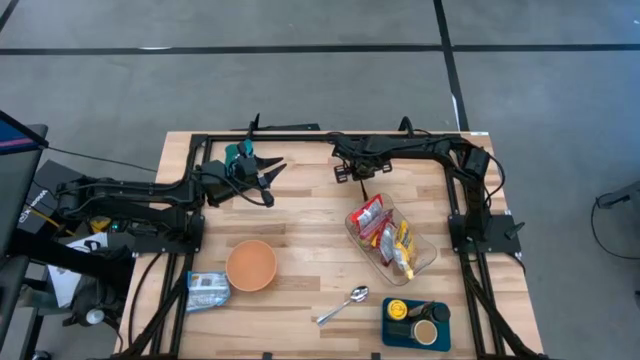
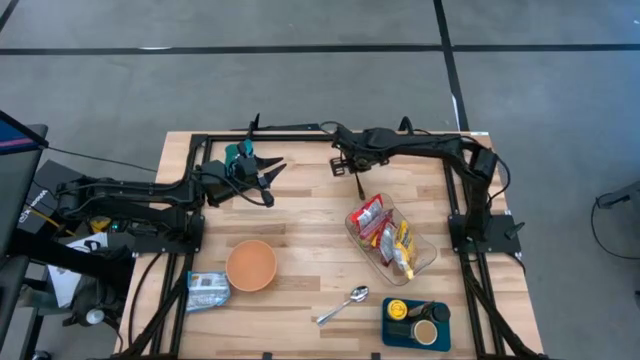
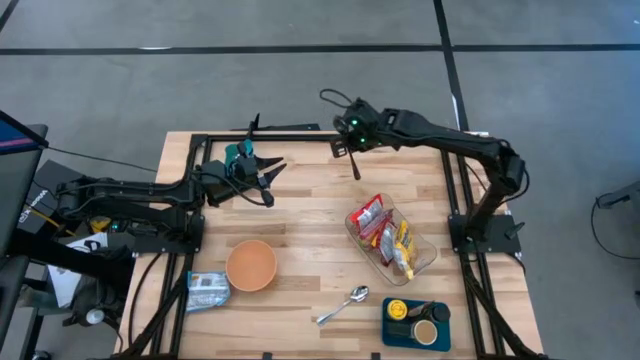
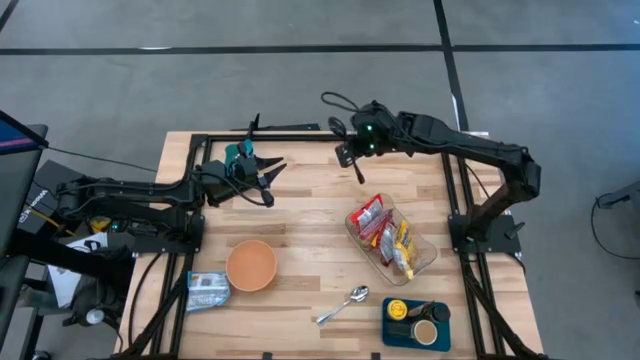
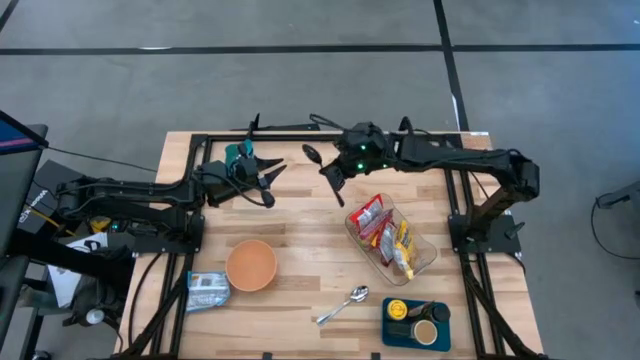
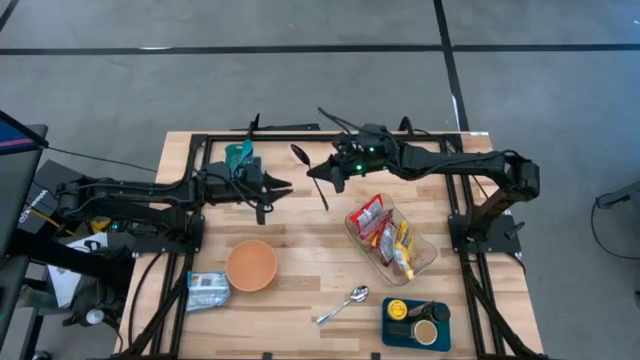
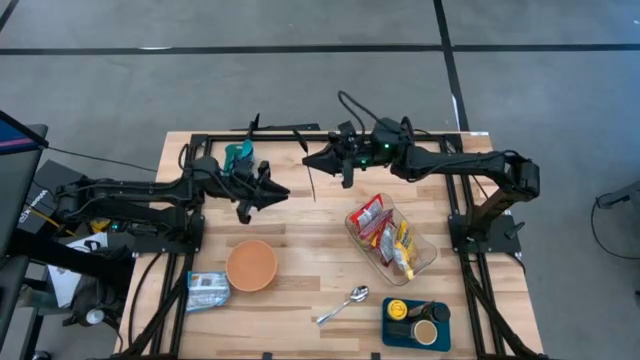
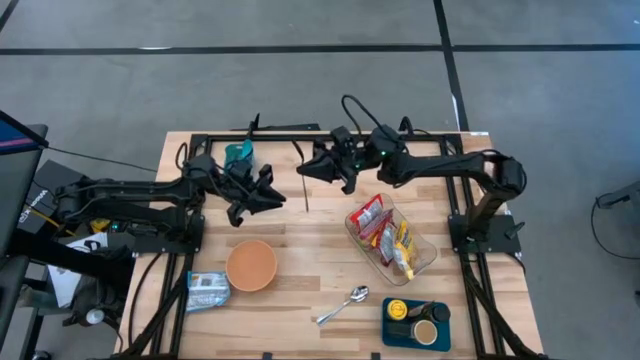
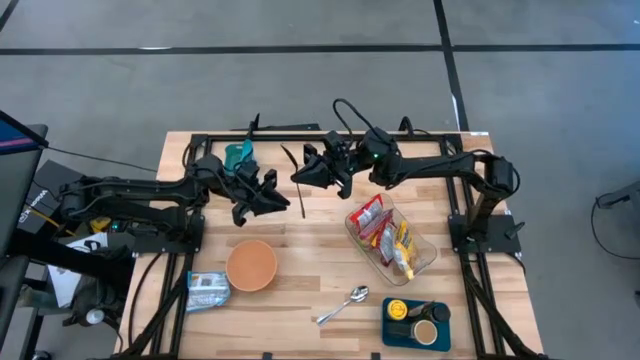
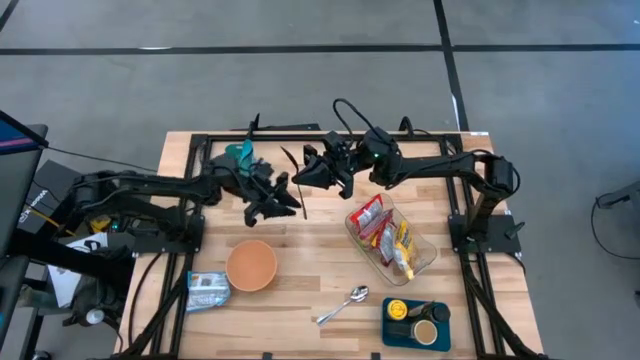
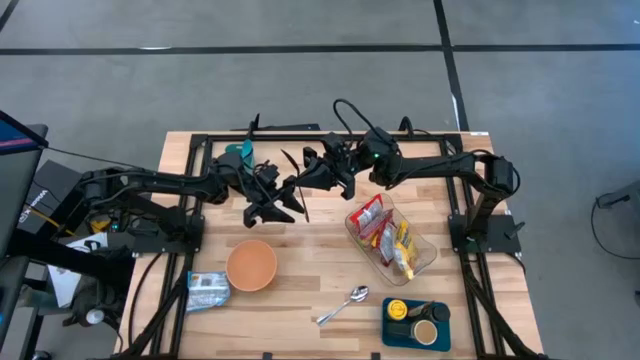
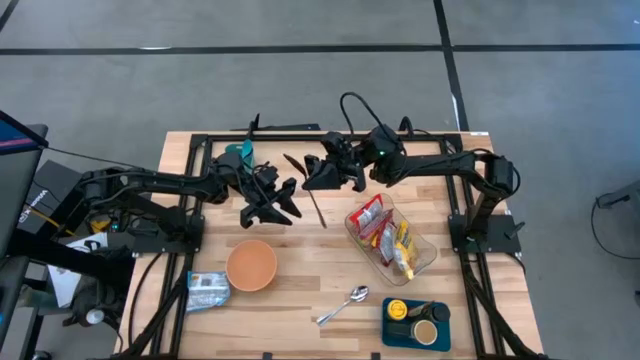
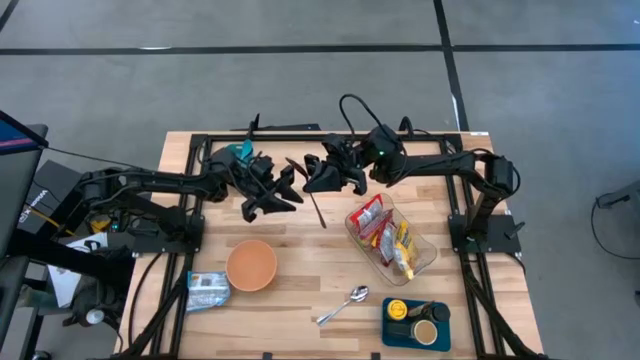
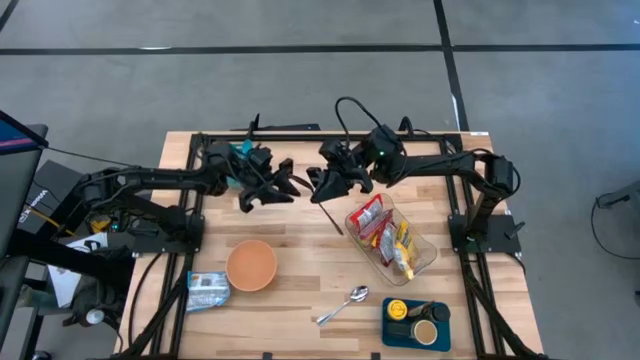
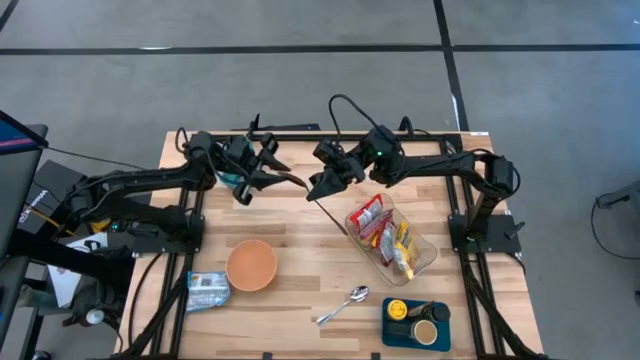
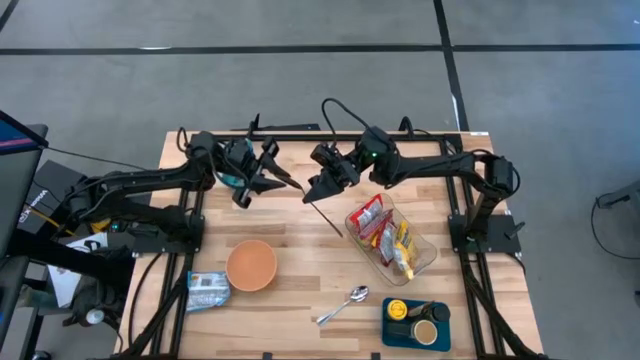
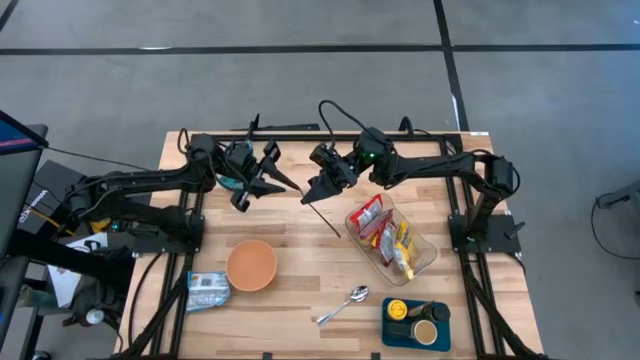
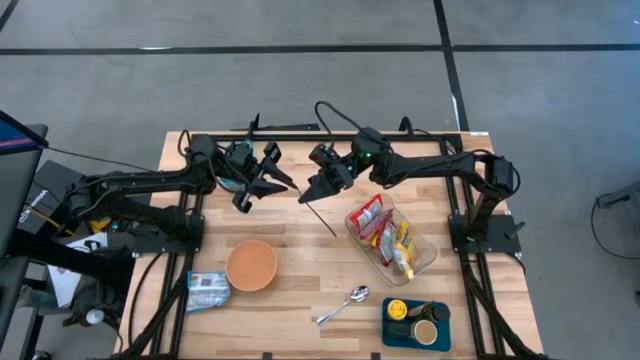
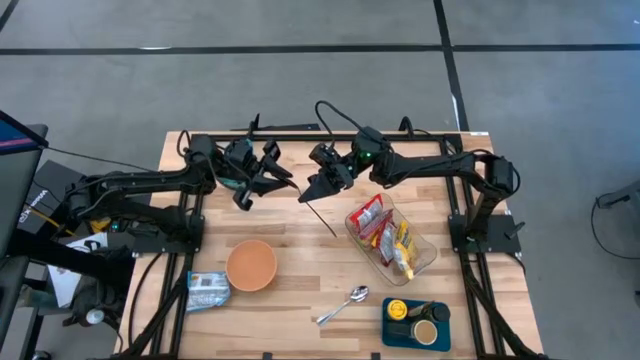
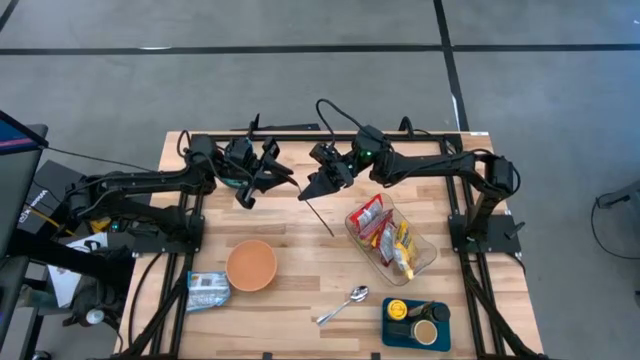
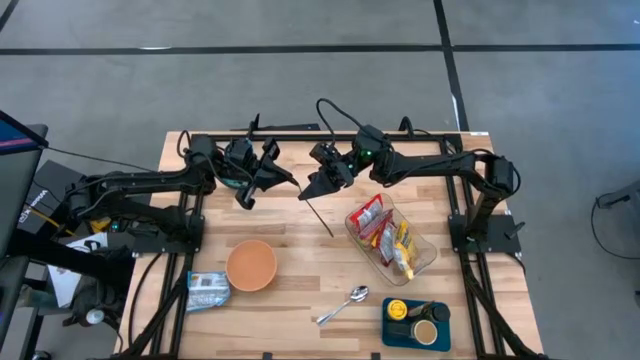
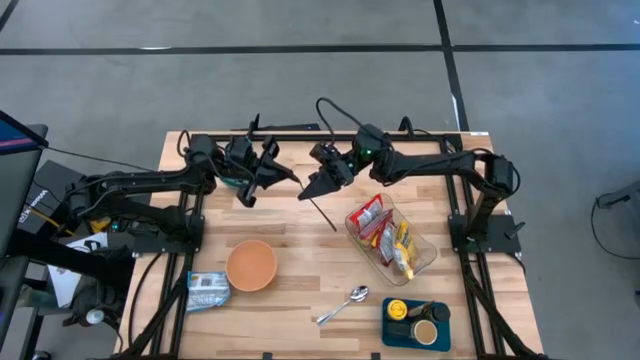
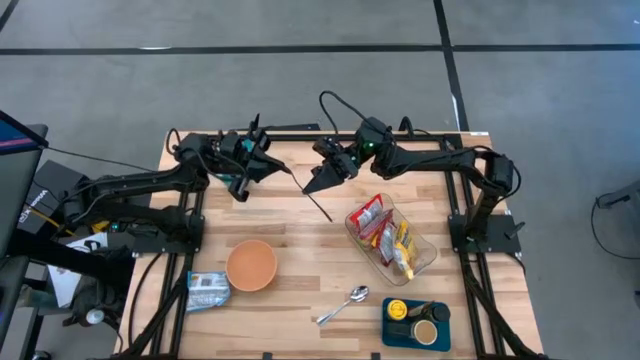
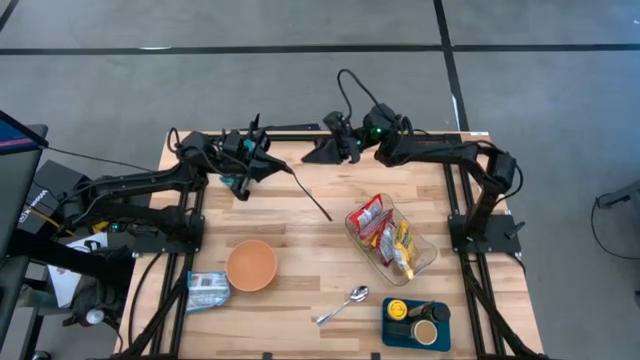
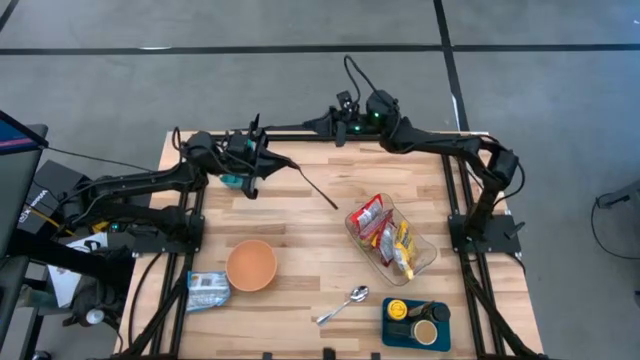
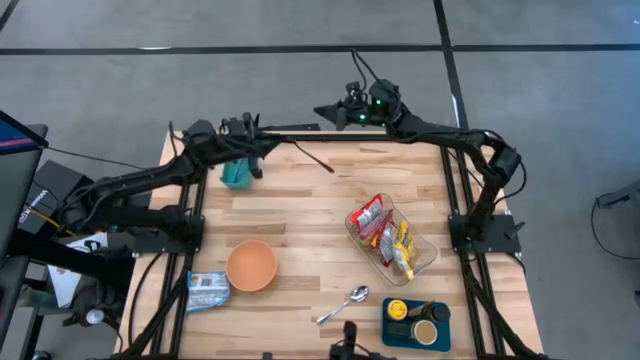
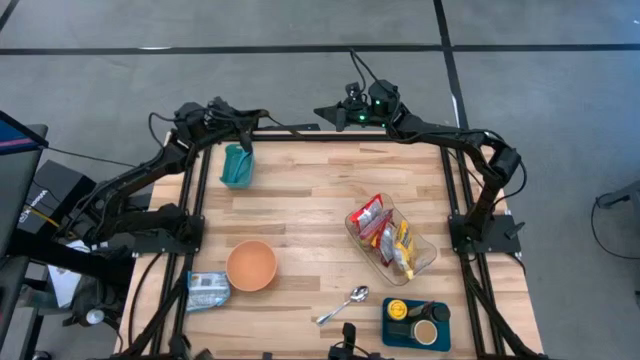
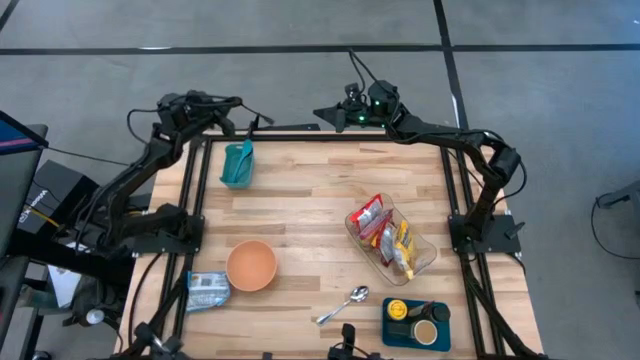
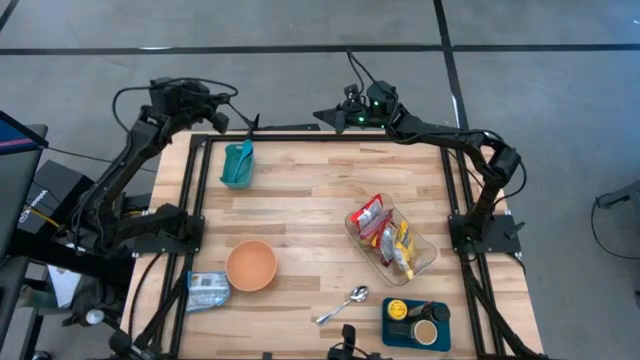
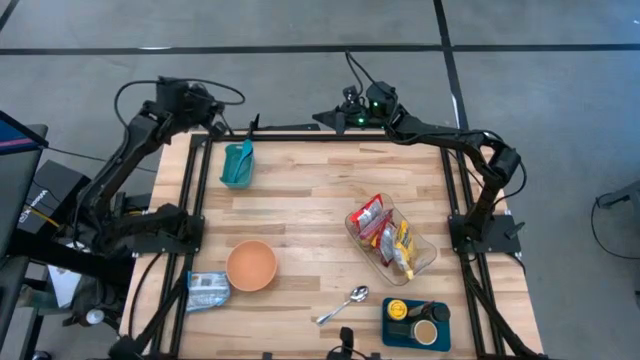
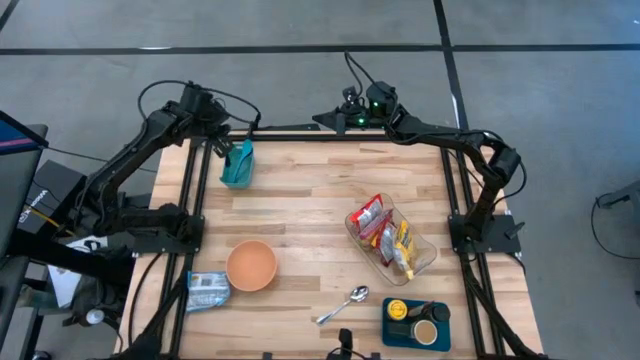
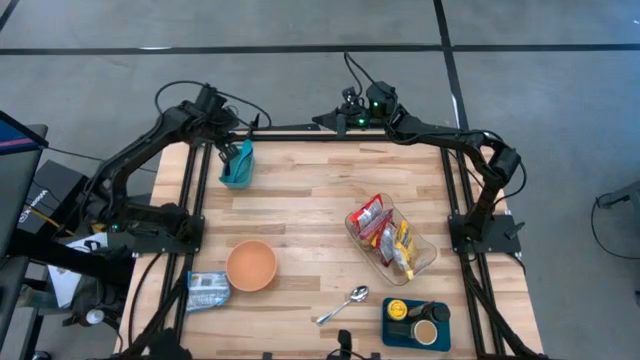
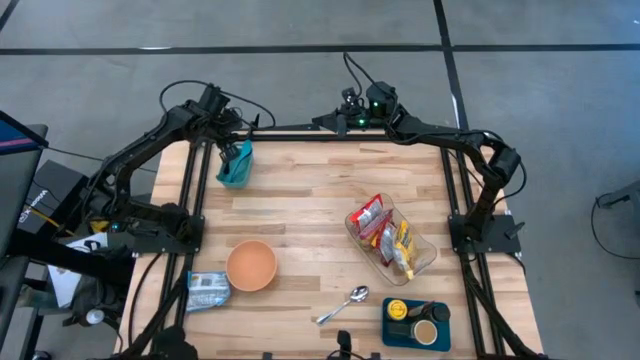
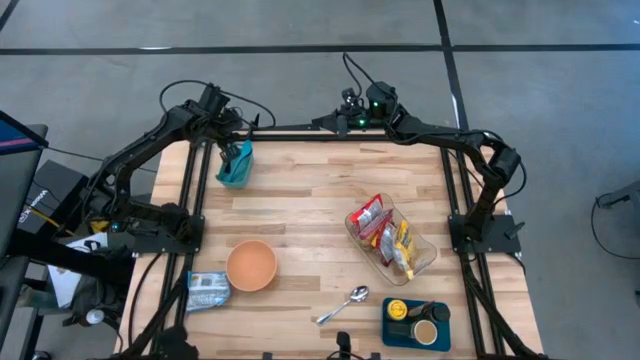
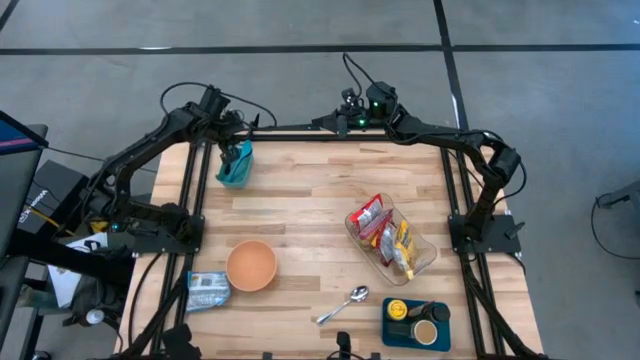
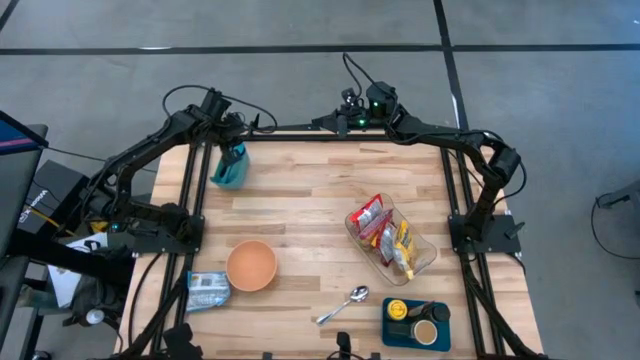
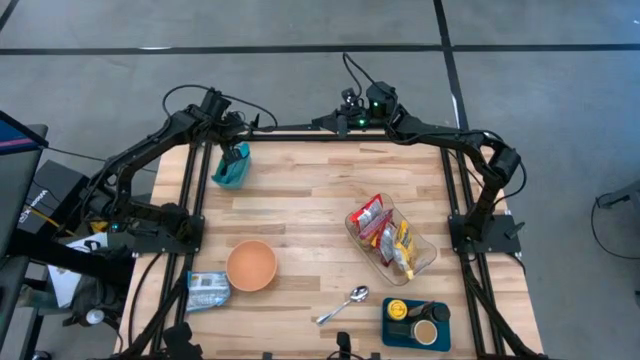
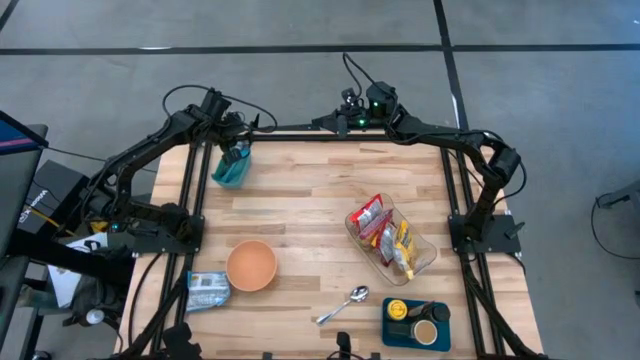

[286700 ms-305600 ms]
Task: Pick & Place Food Item
Put the black spoon into the green bin

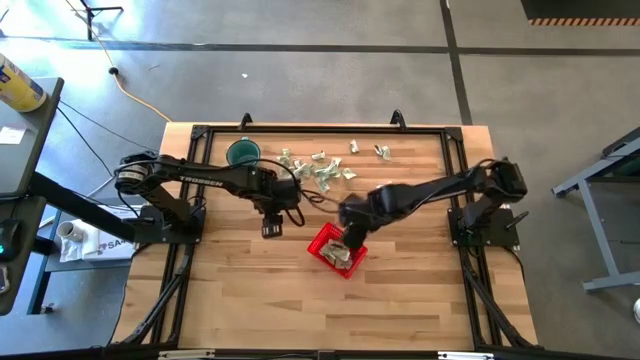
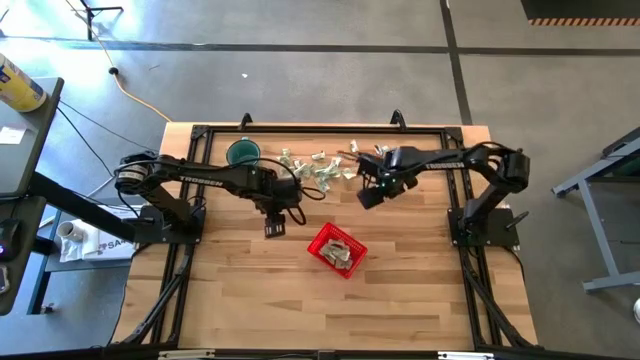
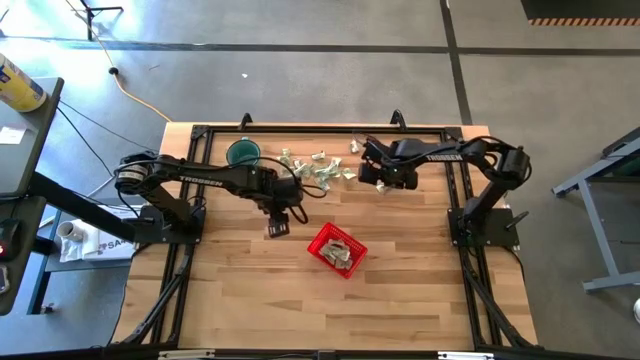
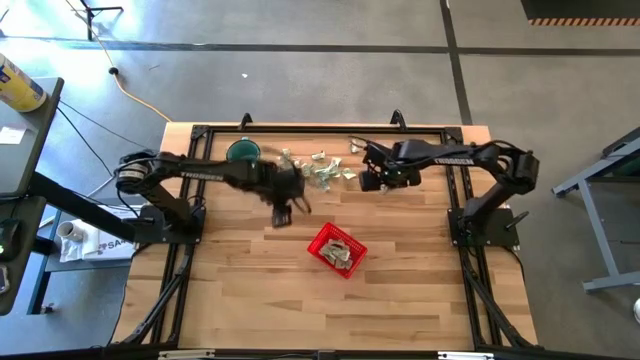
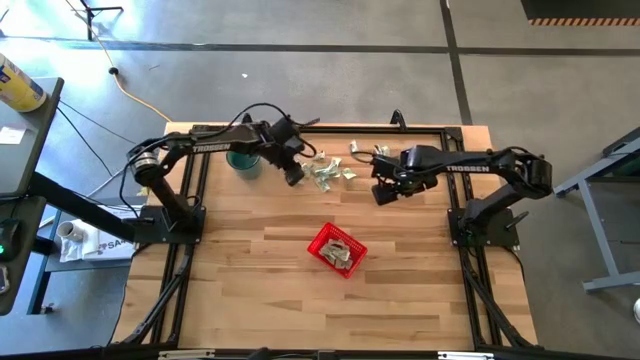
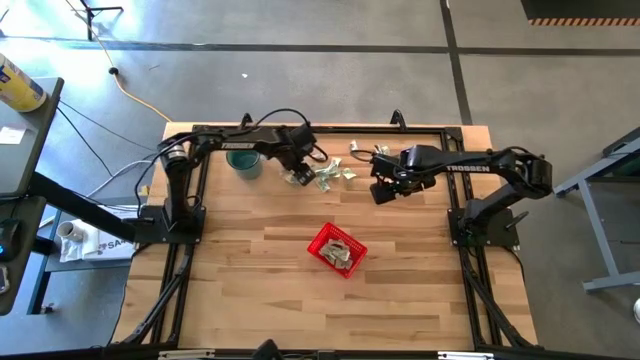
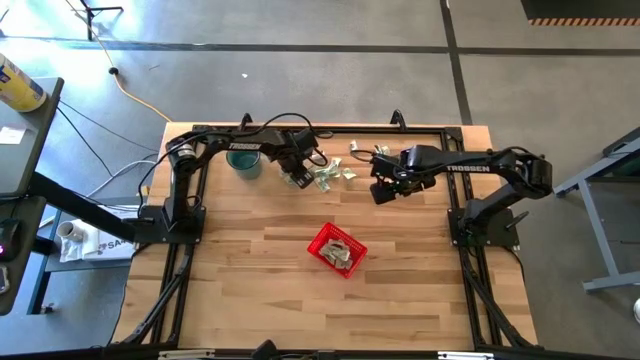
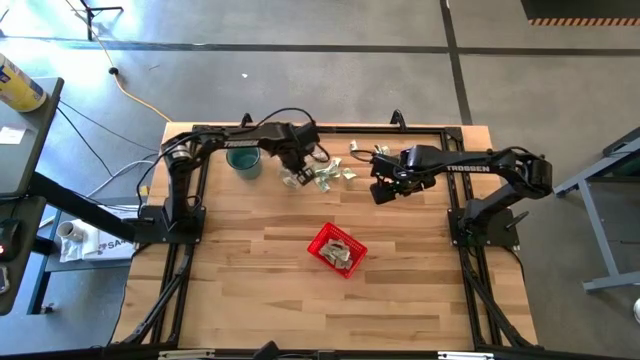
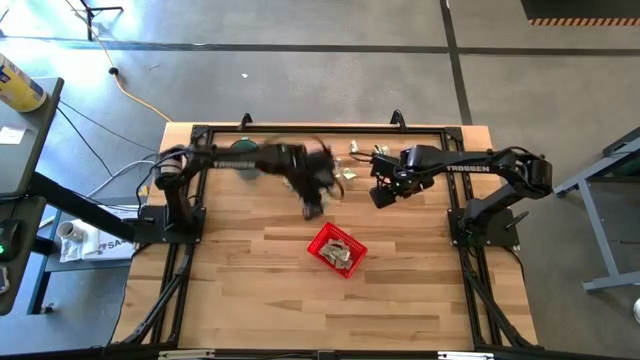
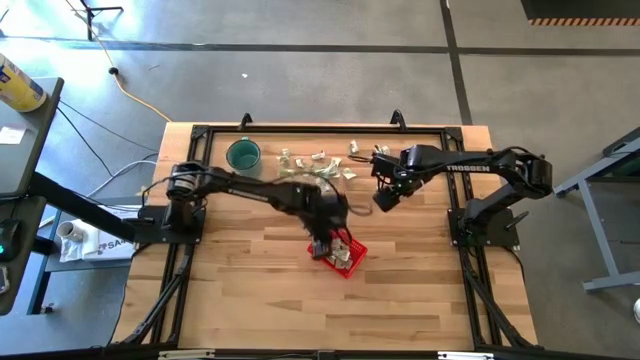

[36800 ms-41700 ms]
Task: Pick and place Stevia / Truvia into bins
Put the light green stevia packet into the bin
